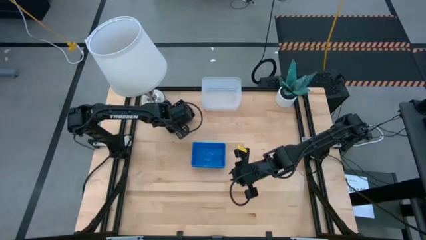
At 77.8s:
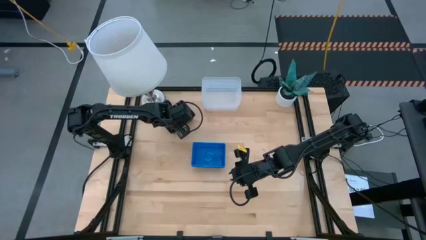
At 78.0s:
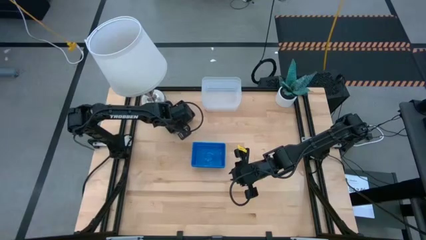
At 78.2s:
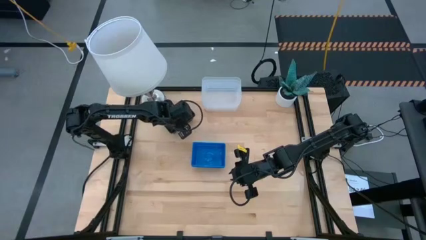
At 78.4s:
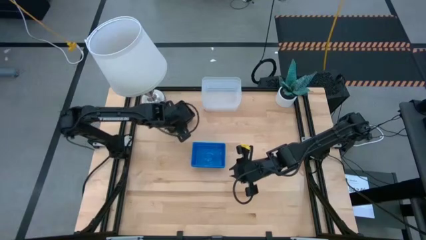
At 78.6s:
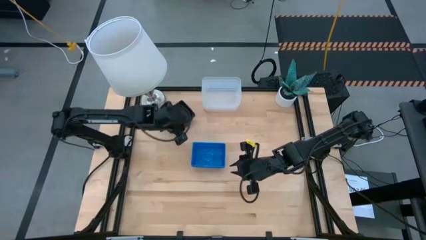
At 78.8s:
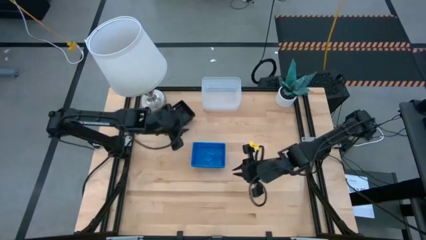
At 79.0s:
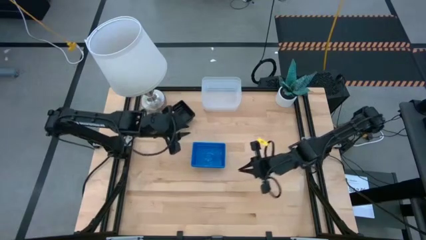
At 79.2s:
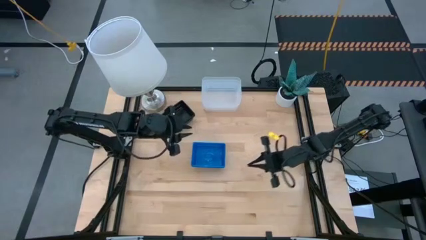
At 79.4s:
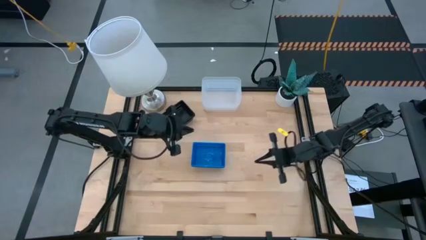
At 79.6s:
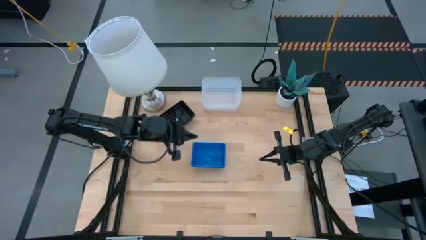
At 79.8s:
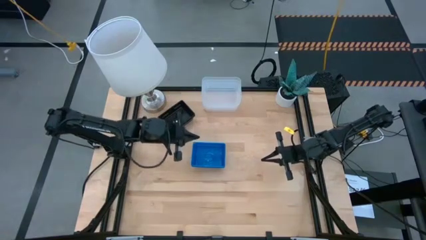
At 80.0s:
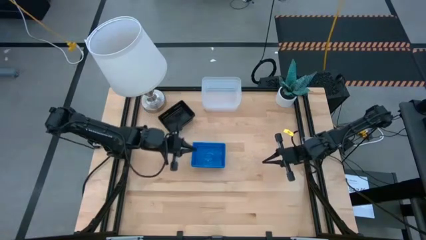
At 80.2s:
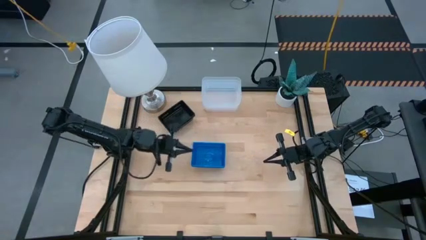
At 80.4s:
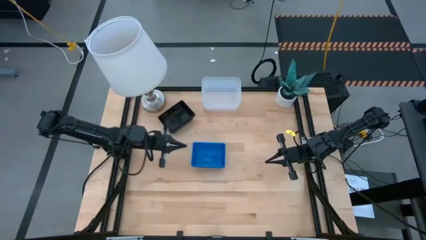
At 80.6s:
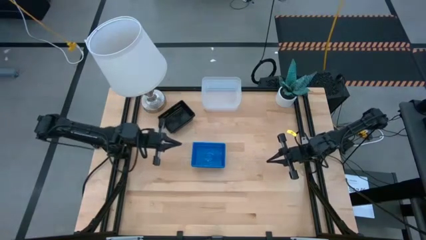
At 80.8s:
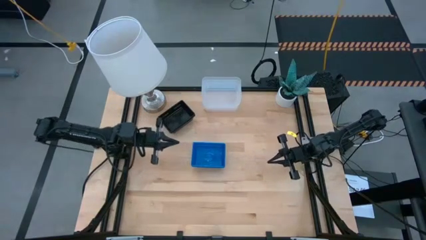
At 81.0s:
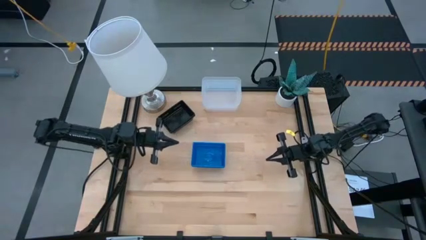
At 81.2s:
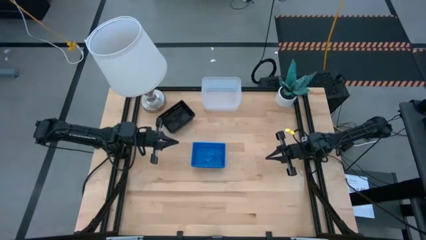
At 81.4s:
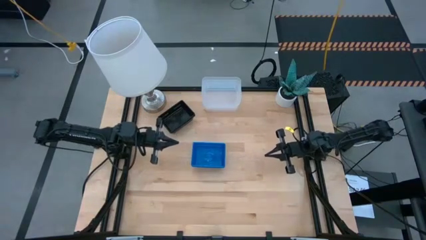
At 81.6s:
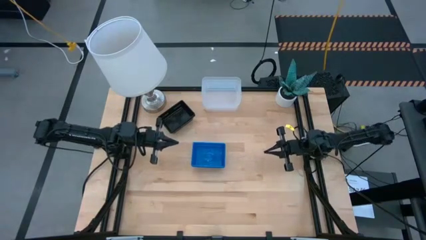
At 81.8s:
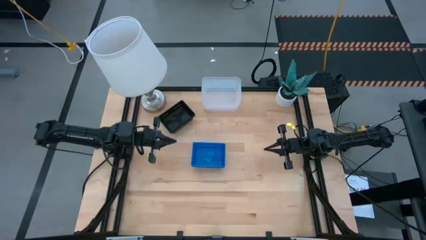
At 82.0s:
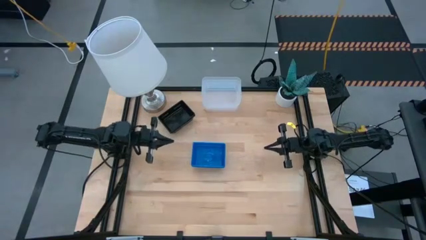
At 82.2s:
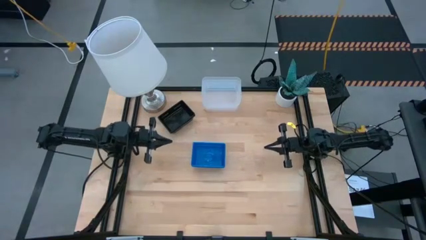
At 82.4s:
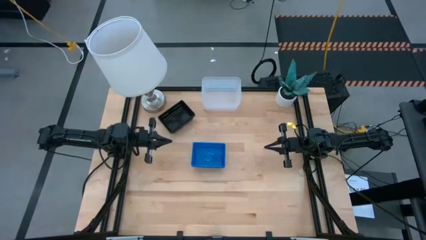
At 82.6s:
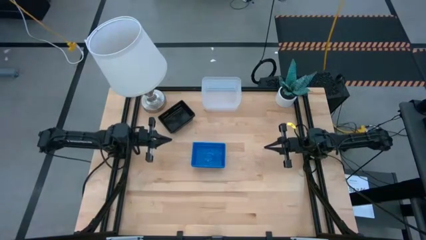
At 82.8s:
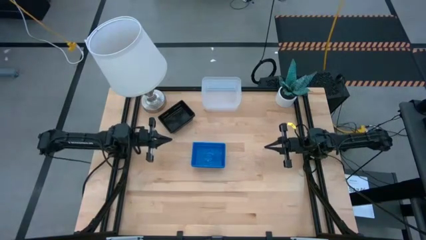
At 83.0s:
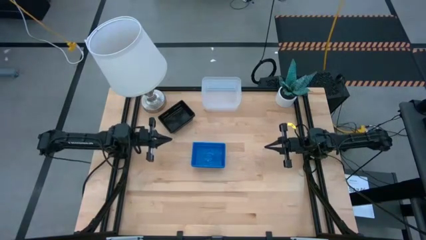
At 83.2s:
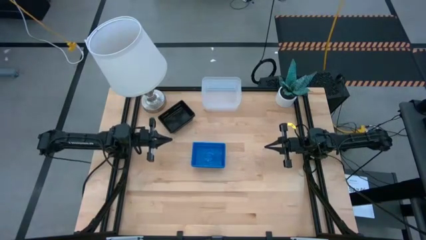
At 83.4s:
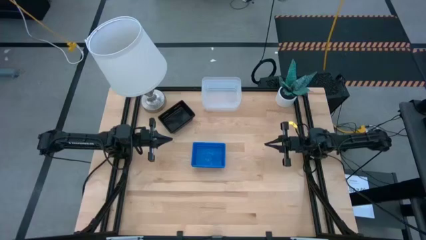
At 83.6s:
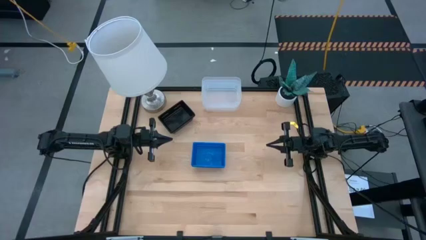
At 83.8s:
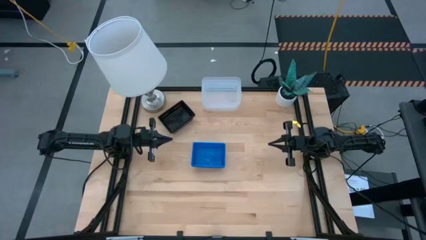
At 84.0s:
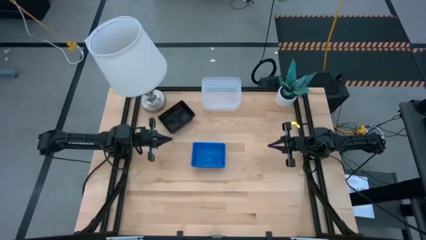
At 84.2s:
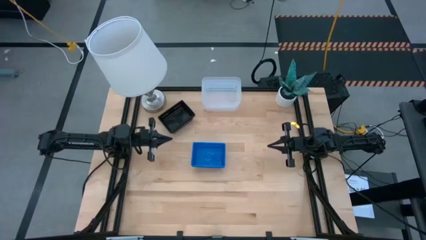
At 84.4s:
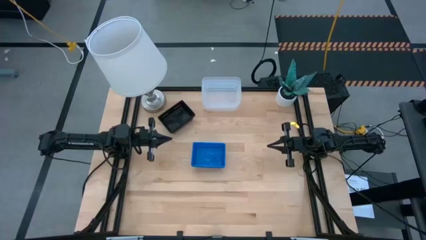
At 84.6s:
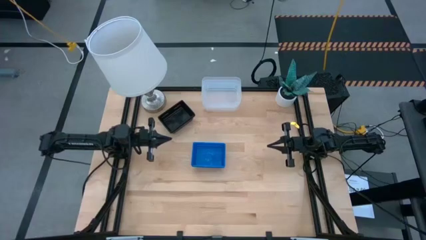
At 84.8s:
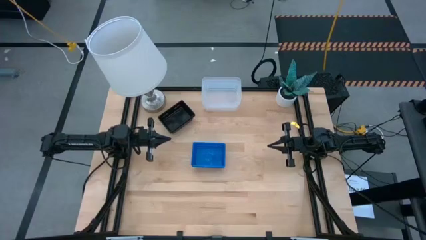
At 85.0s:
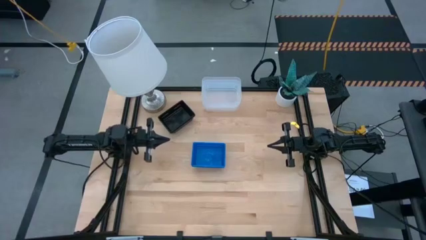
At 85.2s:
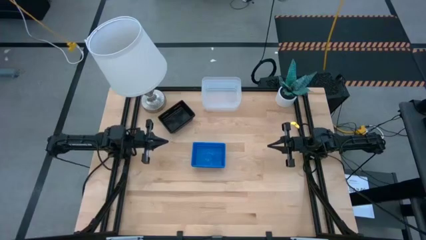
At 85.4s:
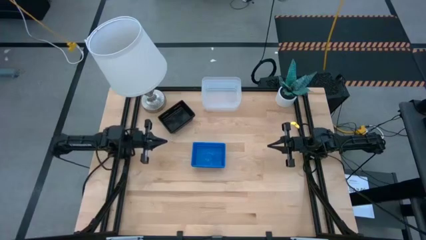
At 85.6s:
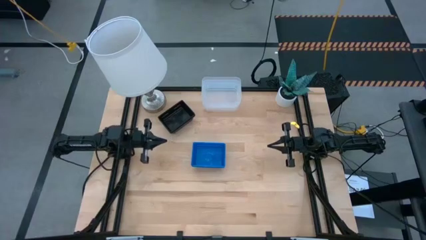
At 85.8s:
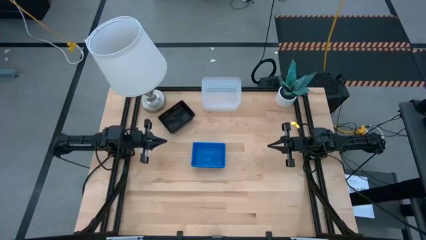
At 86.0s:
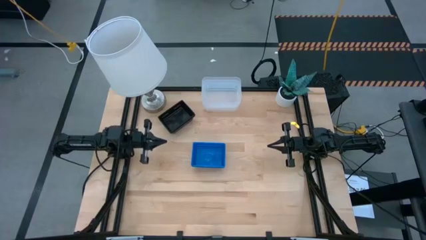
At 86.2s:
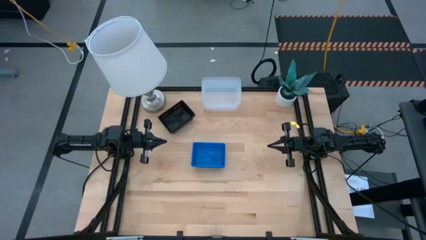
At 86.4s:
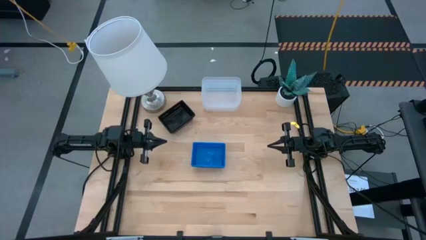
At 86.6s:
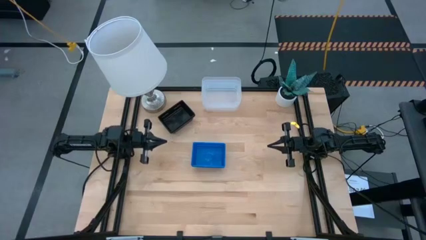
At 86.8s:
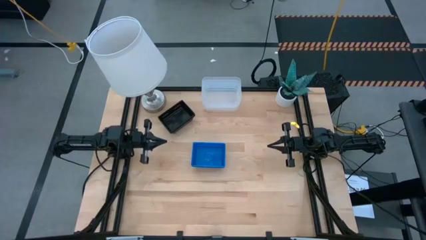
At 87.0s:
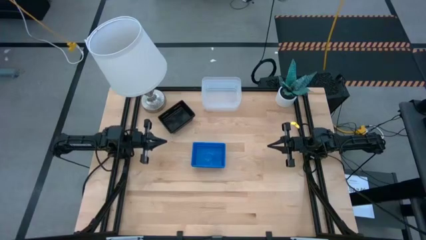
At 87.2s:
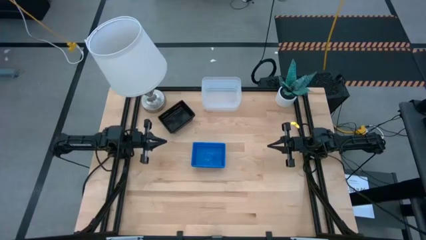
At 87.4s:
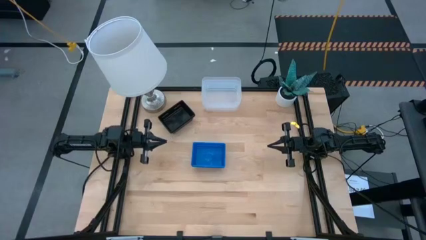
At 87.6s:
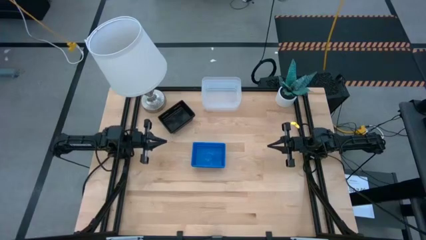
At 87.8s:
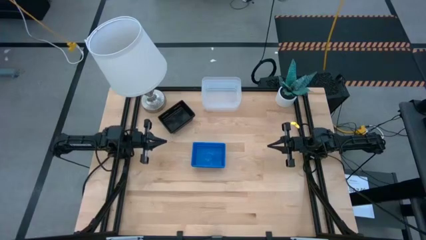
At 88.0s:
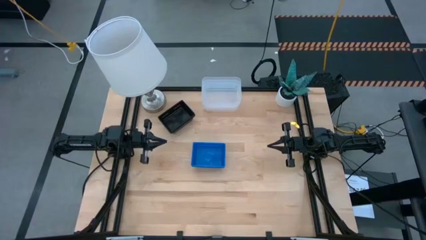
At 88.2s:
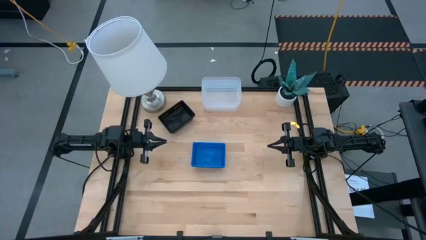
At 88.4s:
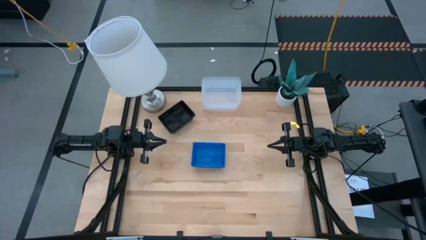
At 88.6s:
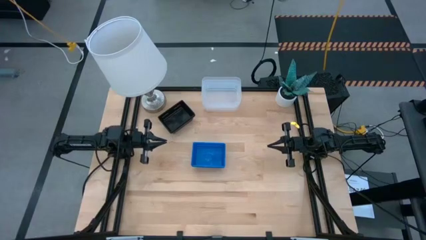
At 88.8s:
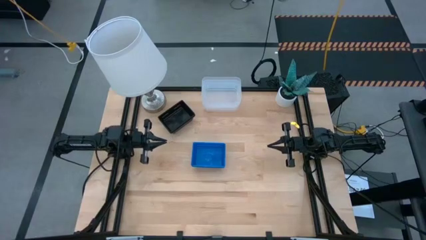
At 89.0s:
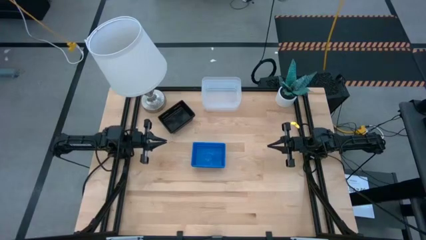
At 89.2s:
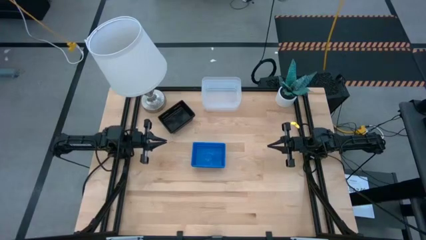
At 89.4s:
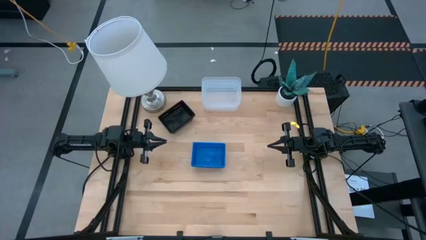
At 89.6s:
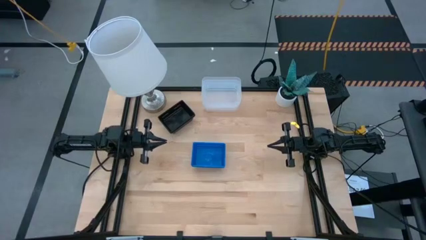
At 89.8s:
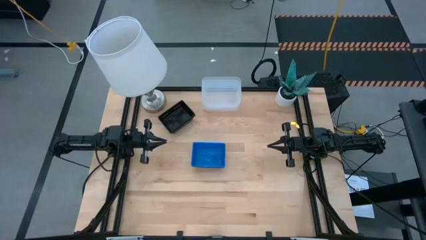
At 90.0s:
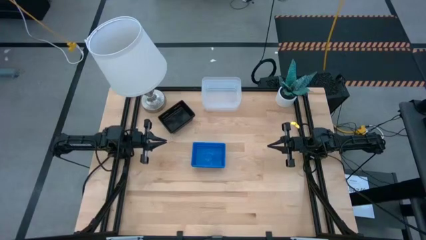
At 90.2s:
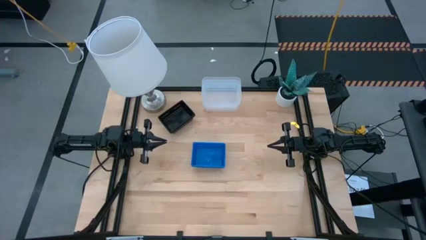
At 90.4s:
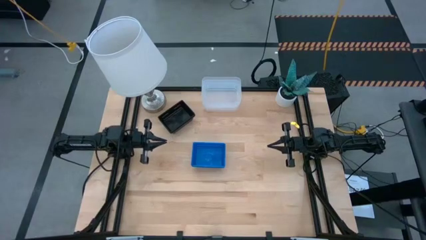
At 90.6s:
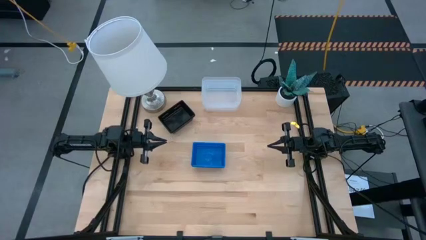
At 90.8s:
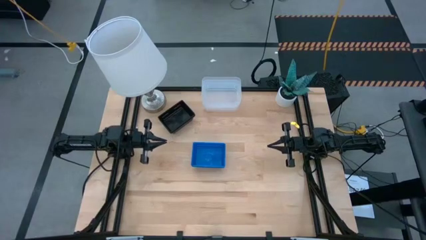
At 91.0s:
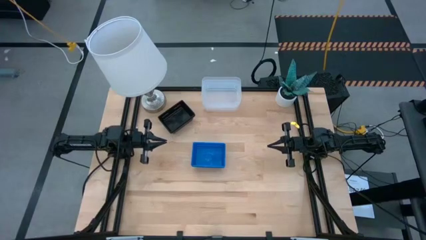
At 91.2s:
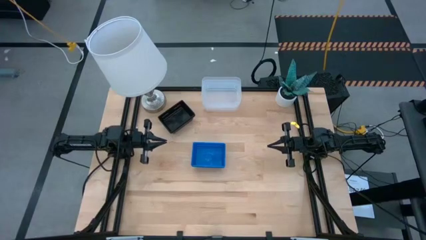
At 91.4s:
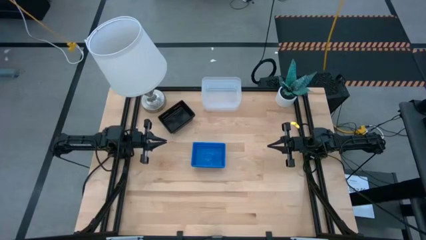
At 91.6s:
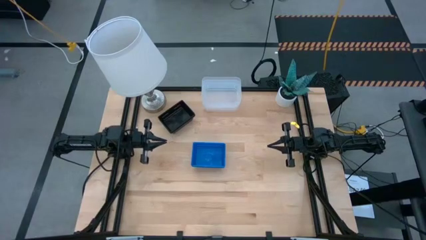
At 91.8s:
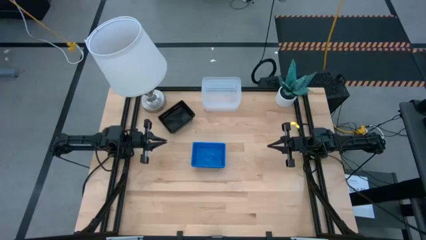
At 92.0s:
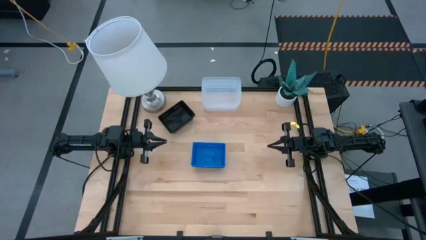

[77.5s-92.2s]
Return to Home Position

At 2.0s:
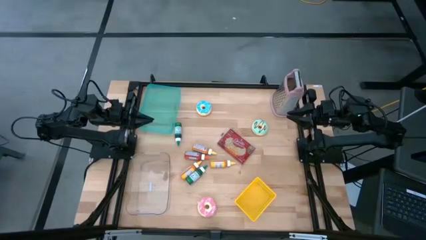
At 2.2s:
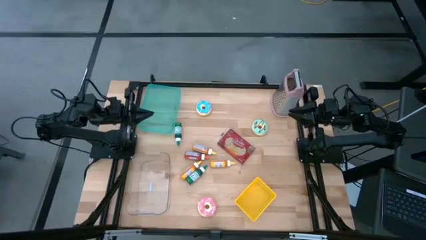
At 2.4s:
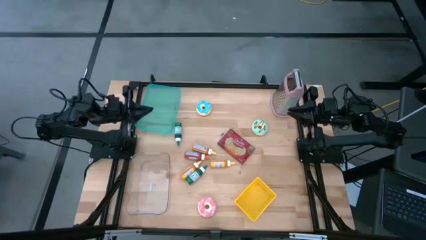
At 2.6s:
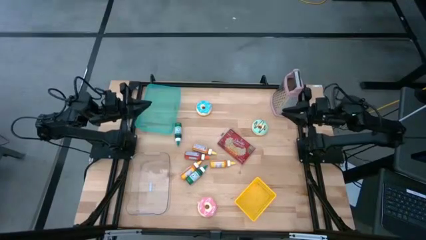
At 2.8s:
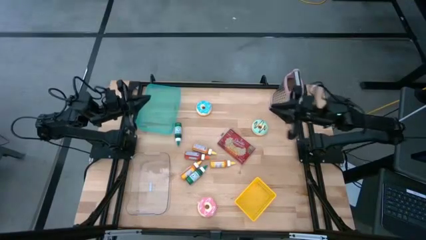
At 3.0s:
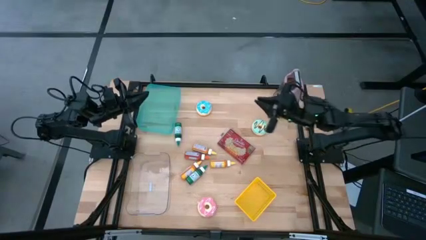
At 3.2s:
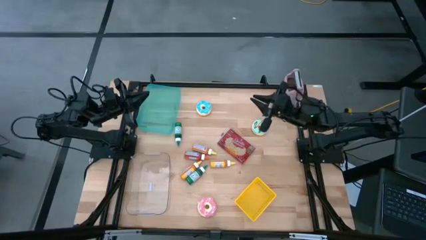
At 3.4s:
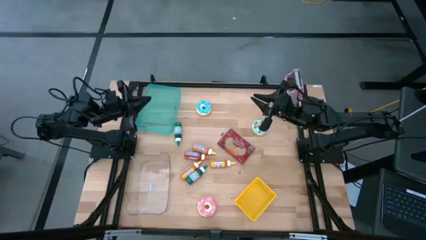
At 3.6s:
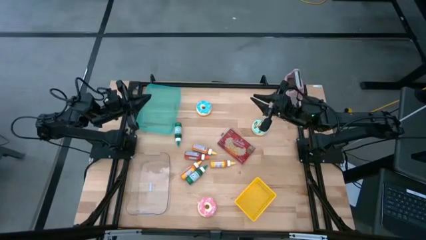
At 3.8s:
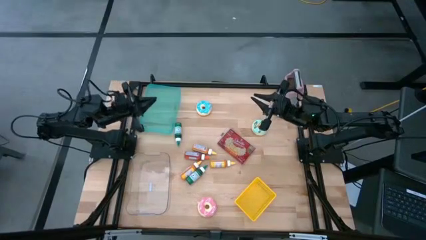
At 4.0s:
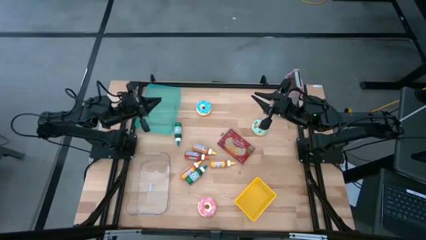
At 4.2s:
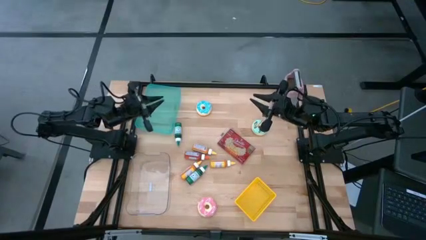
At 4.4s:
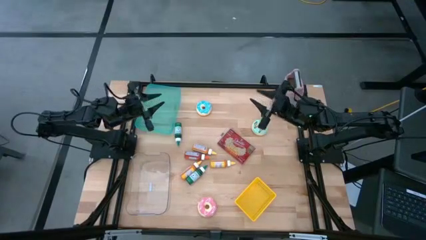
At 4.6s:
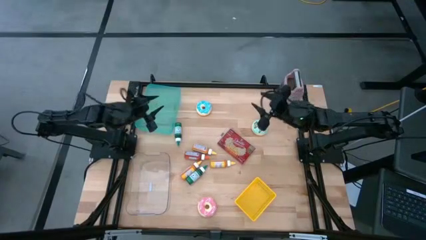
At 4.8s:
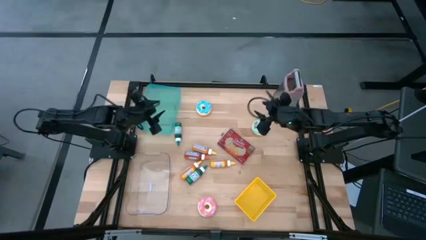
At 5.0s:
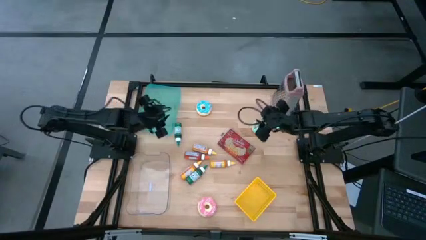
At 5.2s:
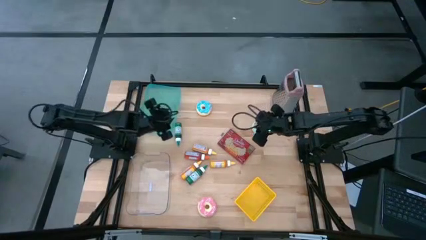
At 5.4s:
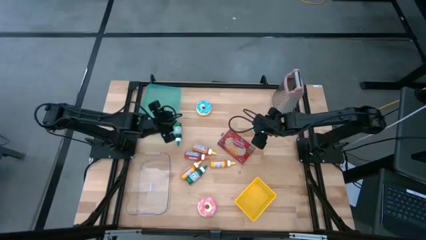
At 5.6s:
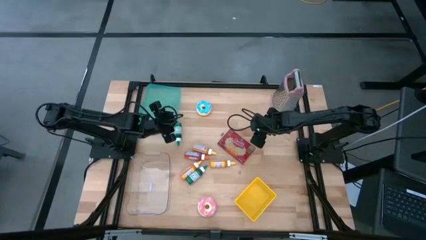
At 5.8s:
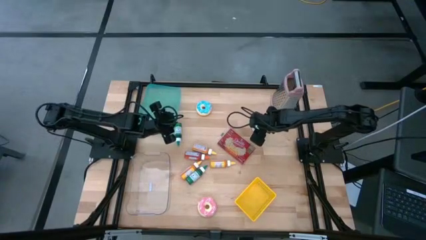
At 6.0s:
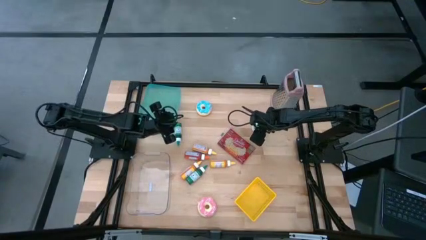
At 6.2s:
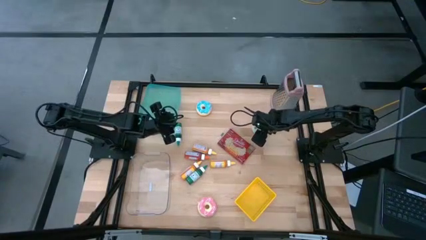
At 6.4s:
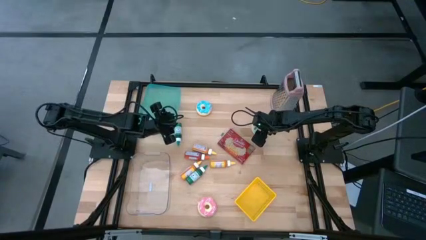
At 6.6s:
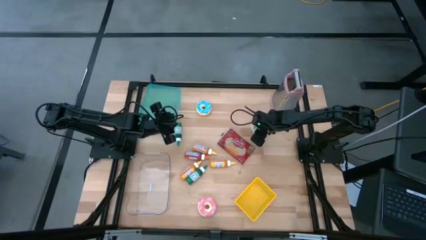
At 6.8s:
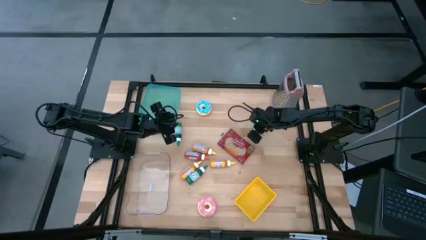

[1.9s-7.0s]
Put the light blue donut into the yellow bin
